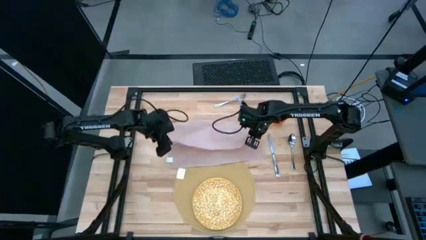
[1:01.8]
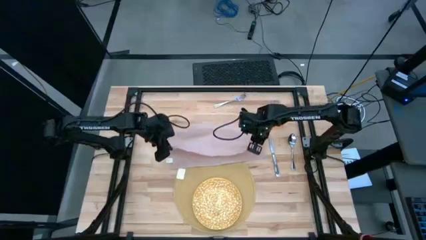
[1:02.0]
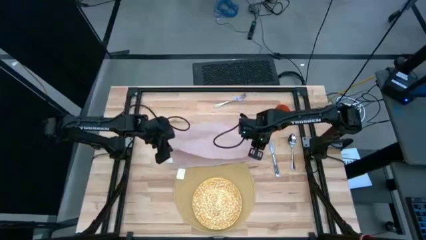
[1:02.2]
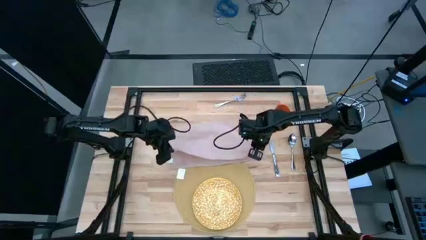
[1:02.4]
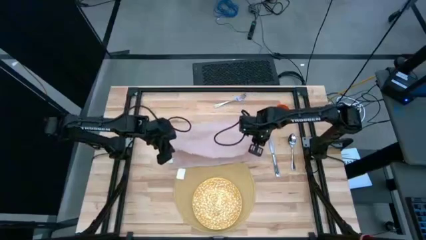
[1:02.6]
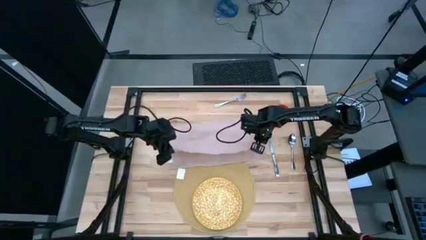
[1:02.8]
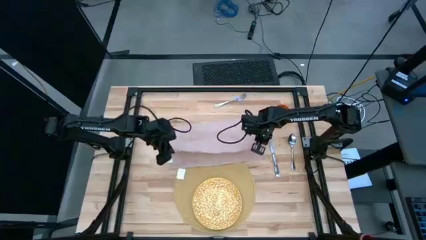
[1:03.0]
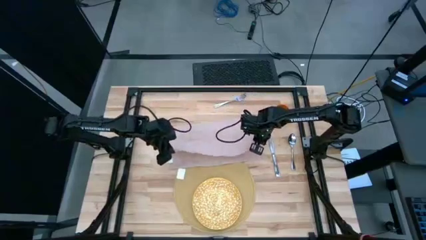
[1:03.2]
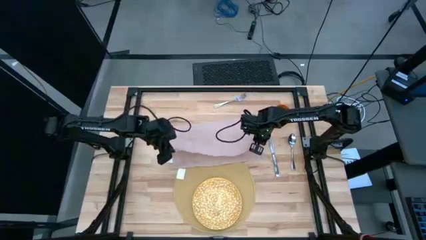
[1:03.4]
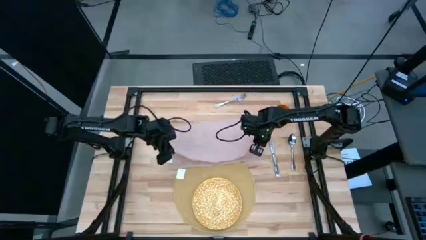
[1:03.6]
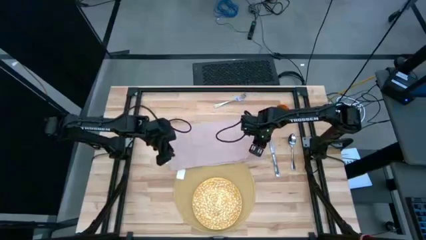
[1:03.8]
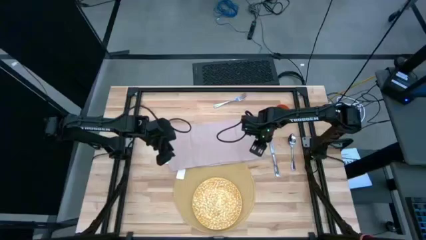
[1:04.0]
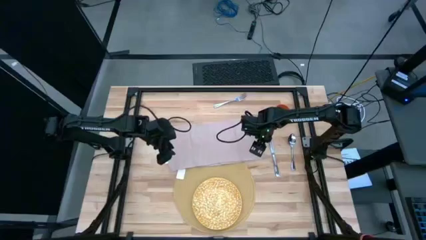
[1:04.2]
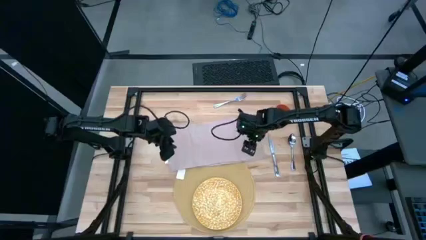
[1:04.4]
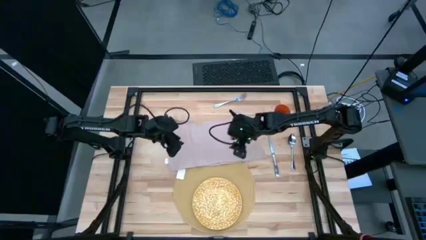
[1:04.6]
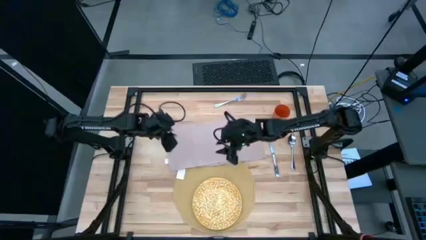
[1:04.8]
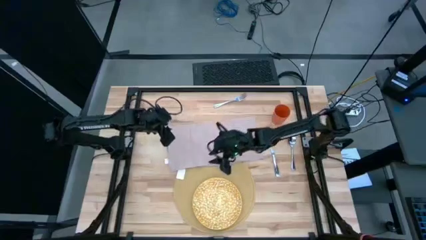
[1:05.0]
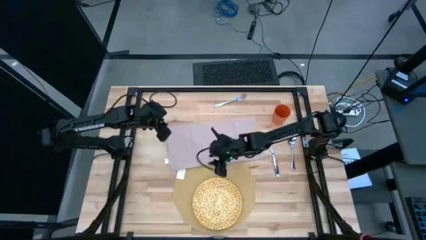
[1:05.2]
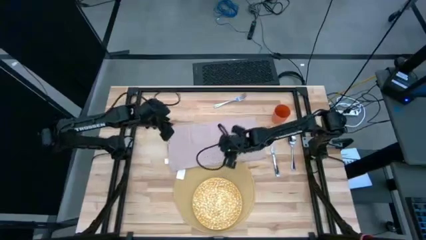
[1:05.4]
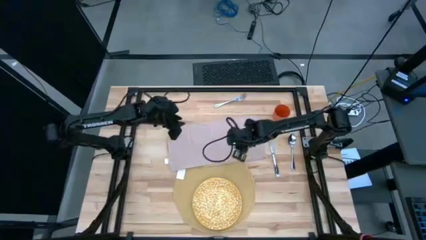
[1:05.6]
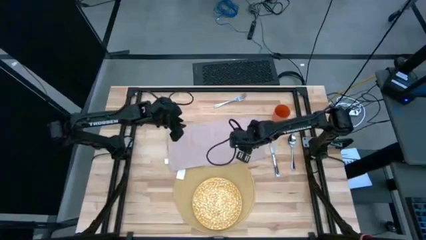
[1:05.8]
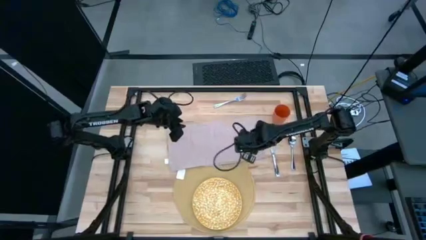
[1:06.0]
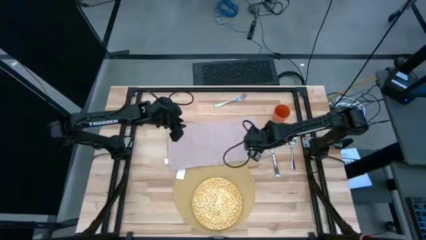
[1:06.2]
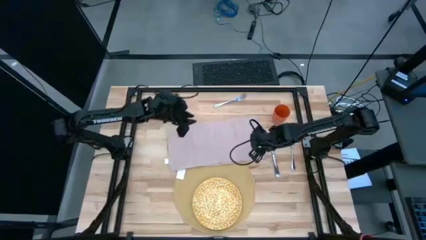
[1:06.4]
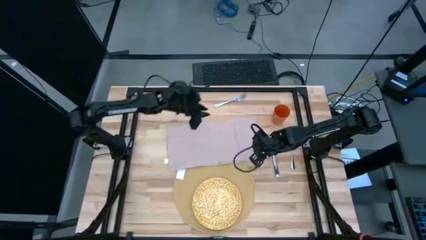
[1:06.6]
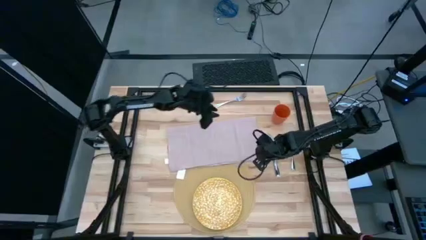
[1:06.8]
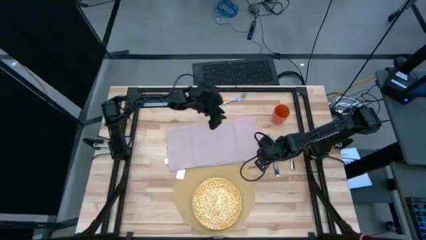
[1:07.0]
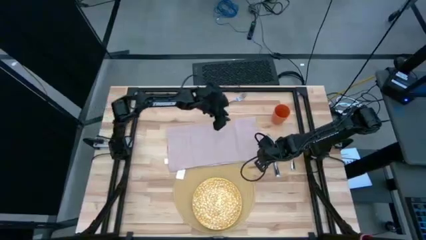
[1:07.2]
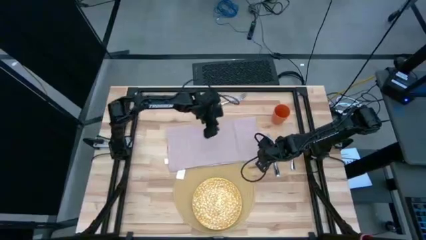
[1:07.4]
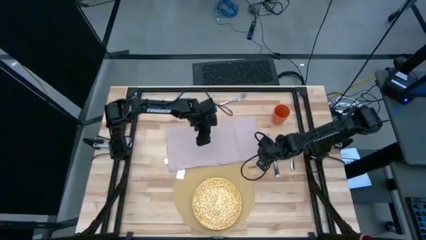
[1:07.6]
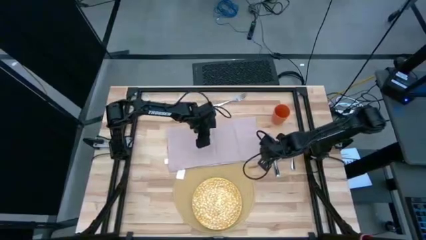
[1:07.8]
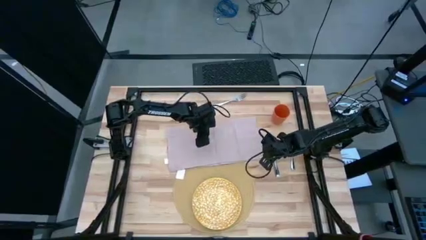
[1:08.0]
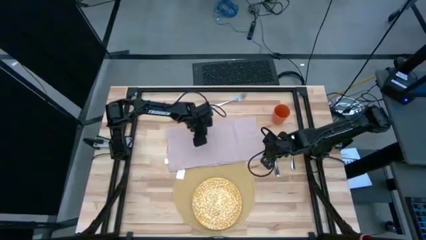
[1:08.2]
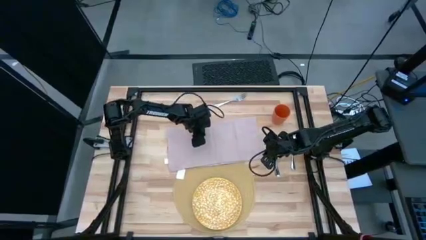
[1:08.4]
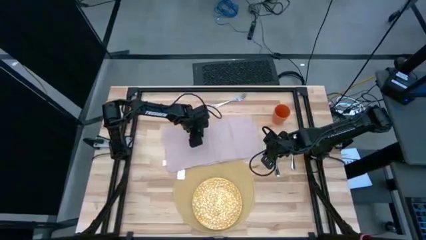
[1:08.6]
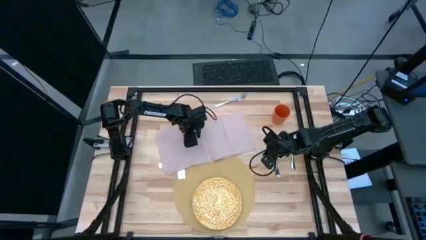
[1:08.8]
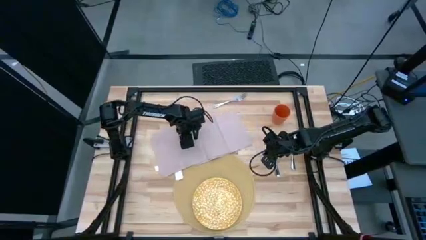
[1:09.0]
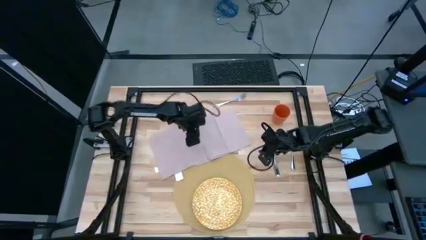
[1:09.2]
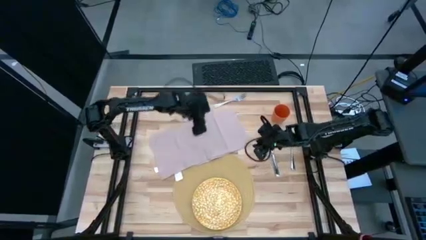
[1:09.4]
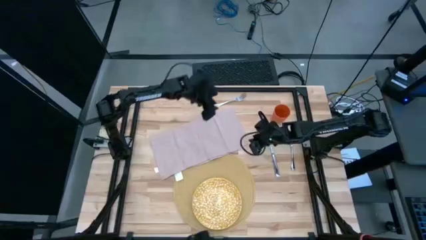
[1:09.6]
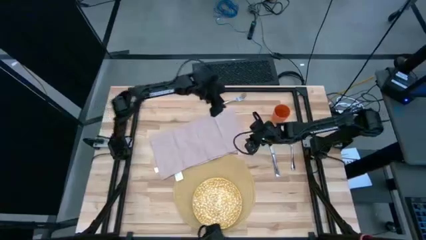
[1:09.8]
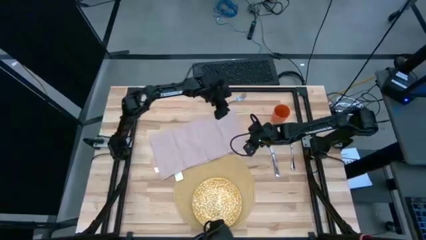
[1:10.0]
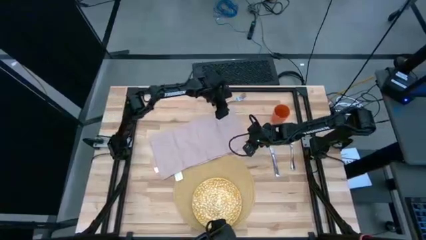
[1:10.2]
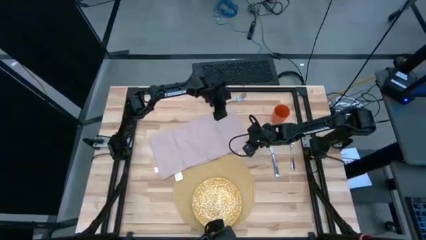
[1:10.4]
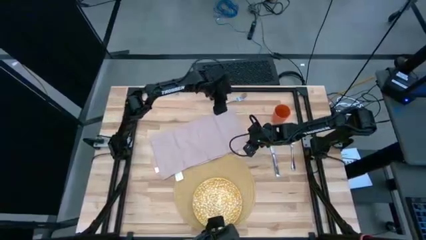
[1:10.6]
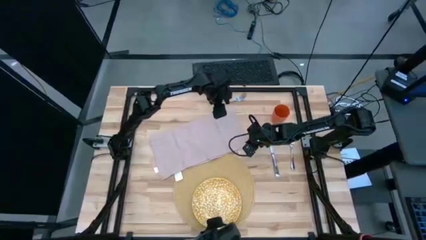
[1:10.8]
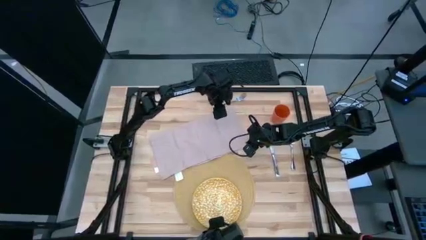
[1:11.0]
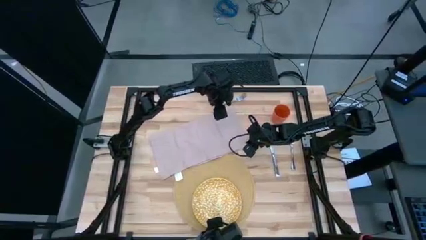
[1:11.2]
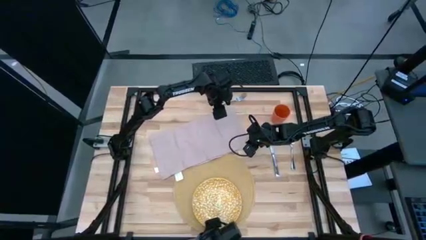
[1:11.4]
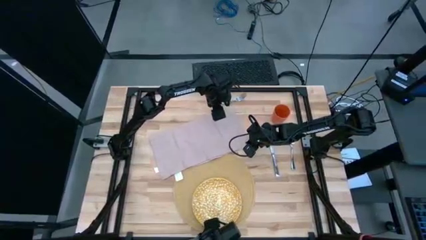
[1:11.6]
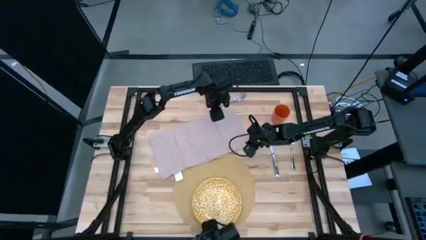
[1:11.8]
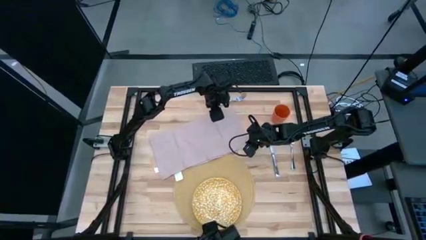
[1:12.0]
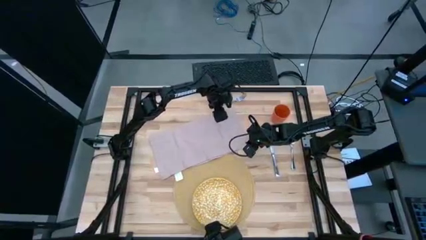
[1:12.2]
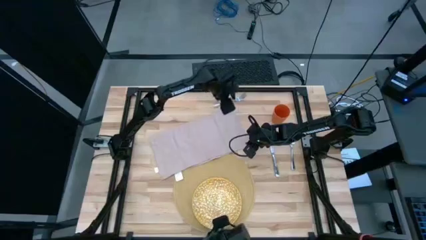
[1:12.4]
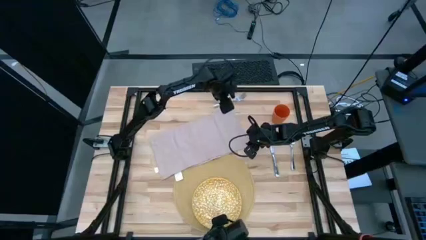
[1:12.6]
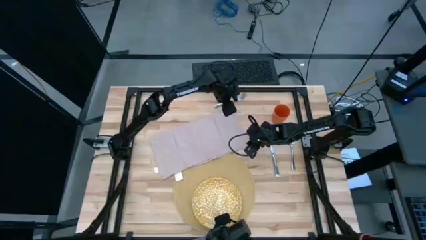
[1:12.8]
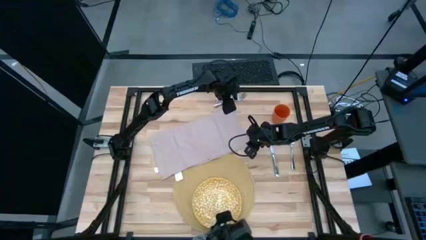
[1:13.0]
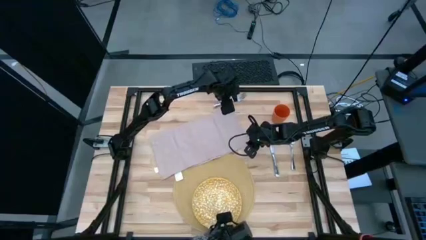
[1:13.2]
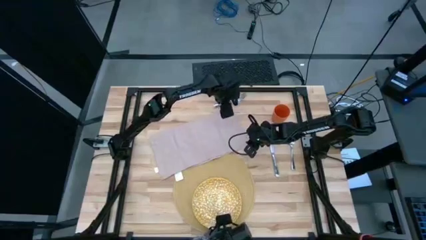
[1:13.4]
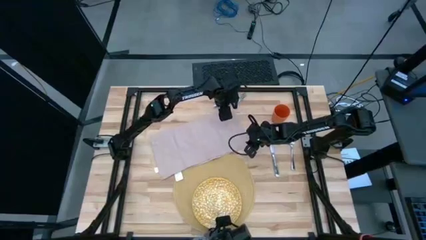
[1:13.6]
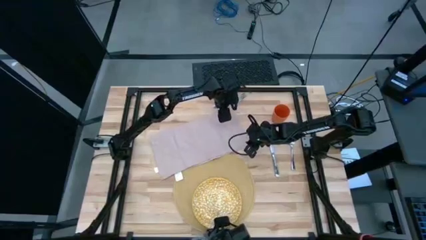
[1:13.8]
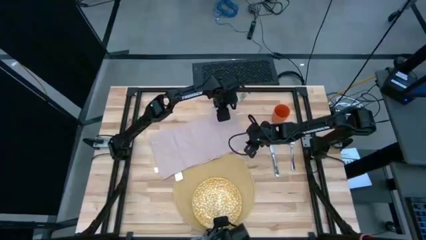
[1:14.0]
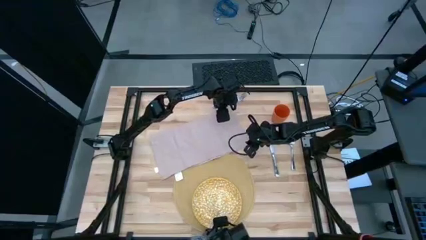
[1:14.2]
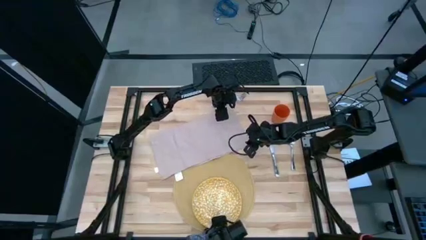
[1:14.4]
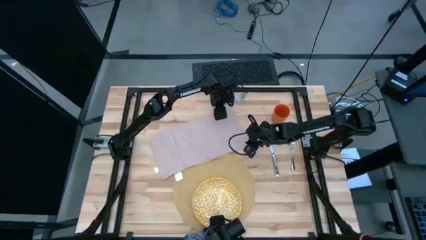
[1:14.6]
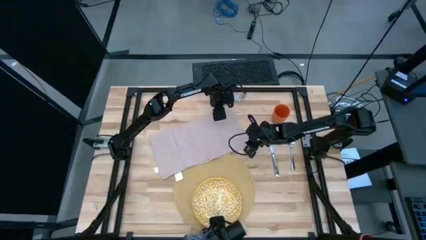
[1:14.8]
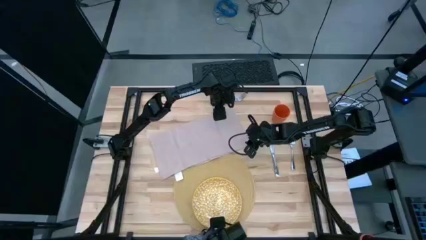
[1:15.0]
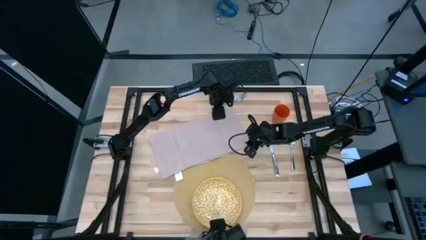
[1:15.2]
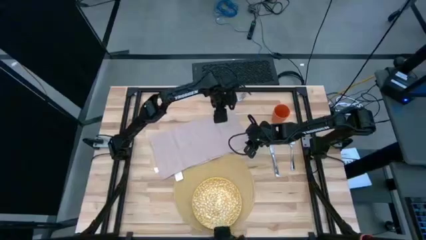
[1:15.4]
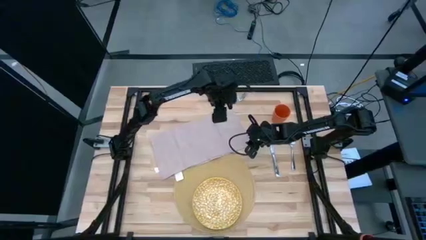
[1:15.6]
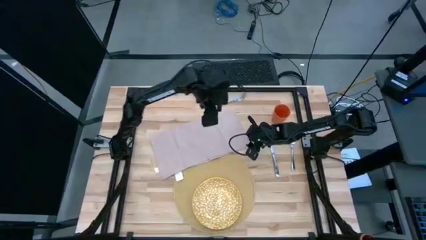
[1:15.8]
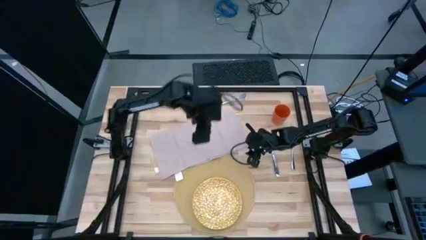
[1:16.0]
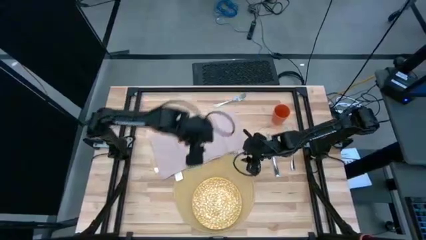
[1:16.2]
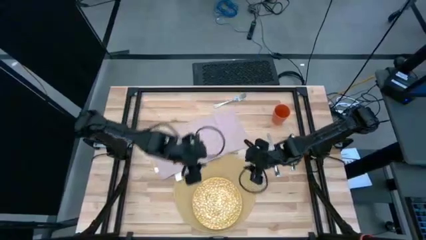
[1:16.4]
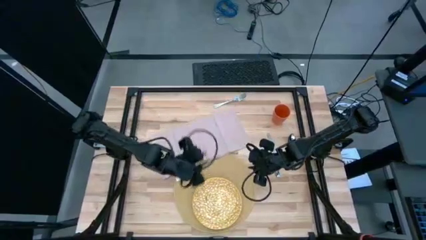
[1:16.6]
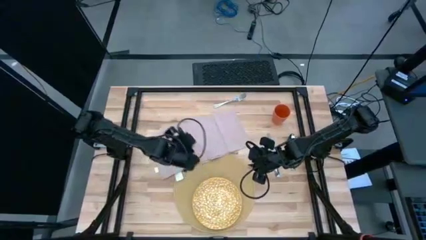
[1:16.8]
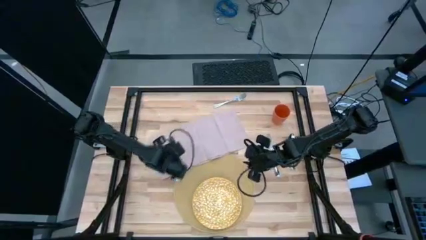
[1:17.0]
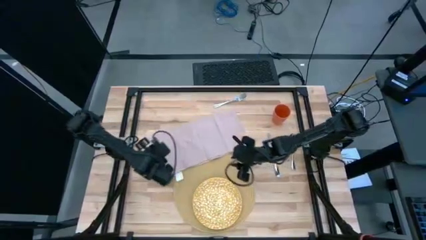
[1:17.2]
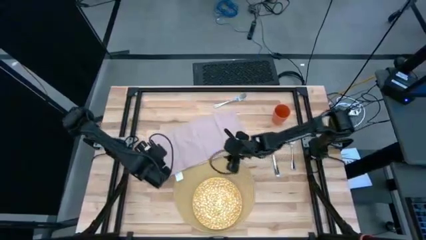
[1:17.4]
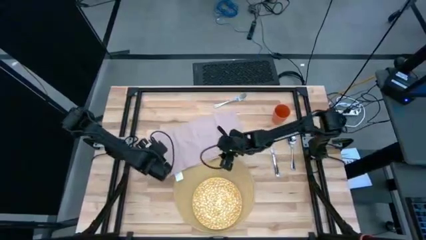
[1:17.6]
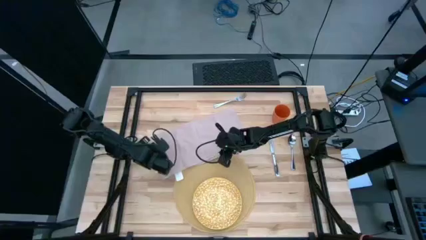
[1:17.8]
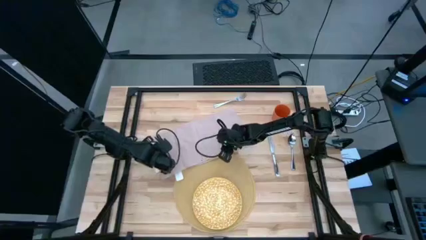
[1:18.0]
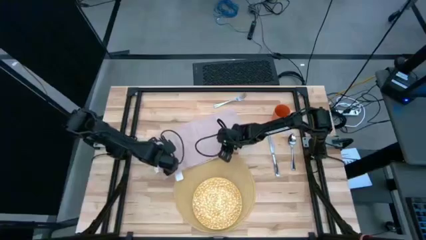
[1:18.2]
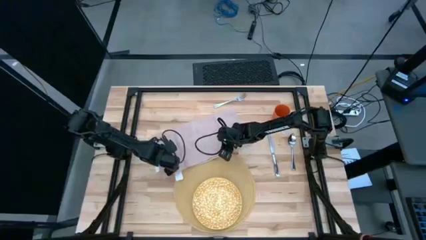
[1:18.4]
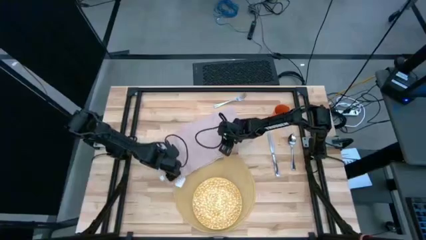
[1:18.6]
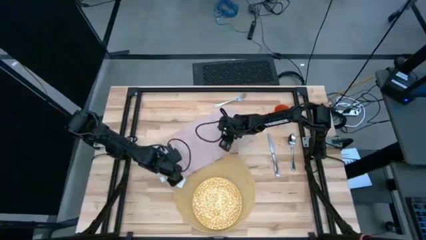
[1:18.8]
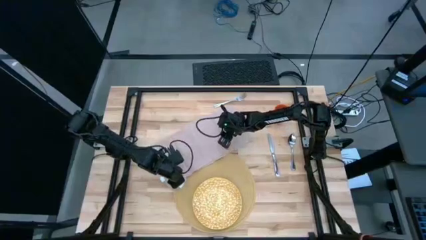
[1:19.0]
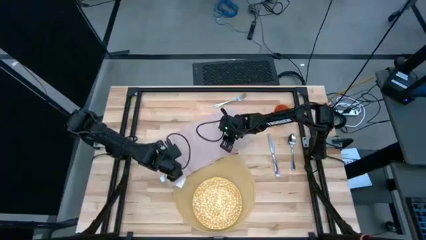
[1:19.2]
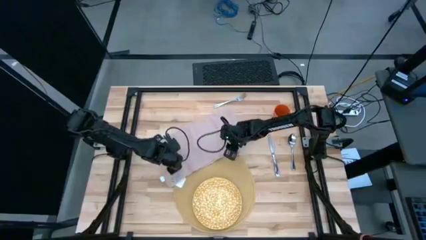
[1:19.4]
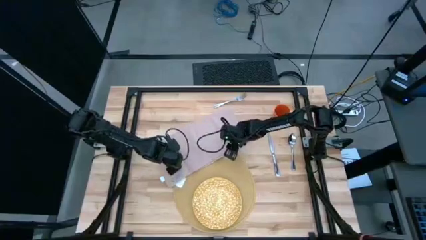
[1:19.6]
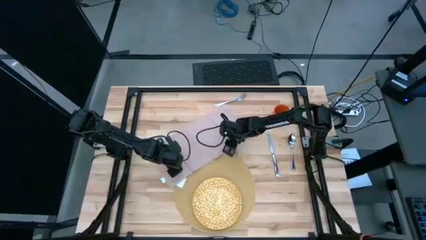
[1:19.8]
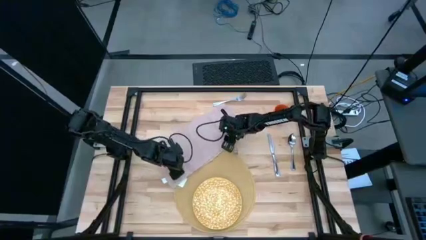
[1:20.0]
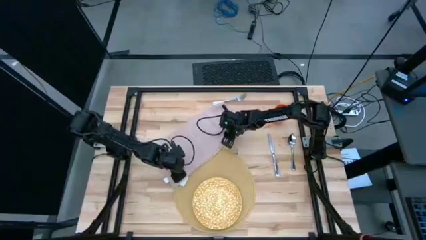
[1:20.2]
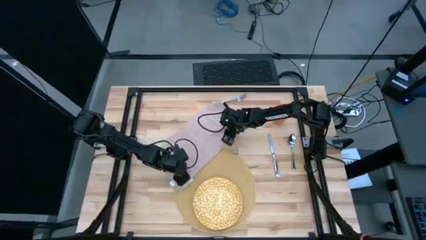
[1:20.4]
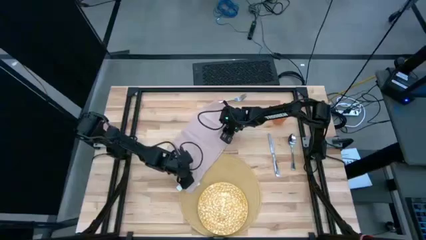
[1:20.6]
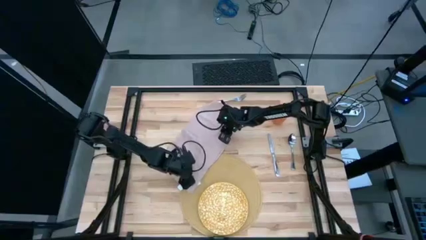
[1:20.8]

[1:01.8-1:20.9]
Task: Set table place
Fold the brown table napkin
